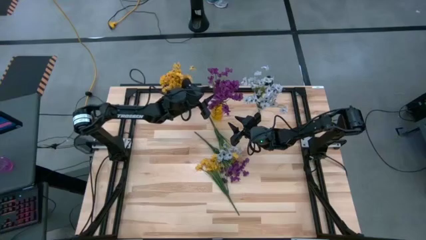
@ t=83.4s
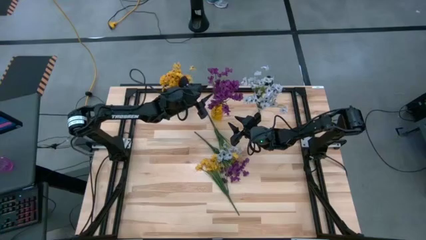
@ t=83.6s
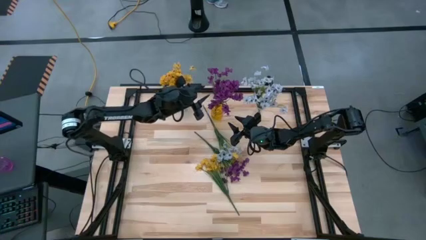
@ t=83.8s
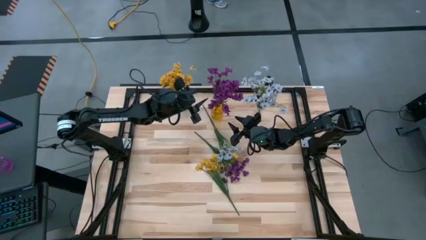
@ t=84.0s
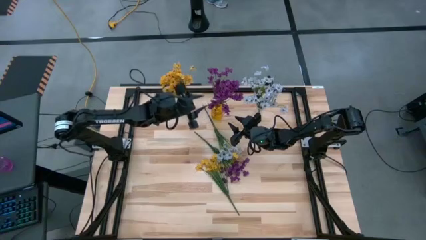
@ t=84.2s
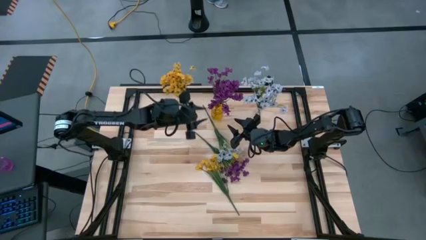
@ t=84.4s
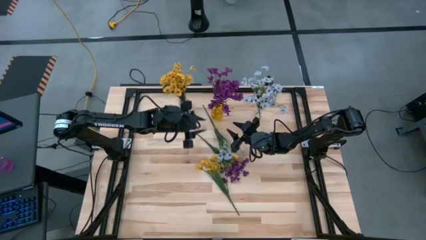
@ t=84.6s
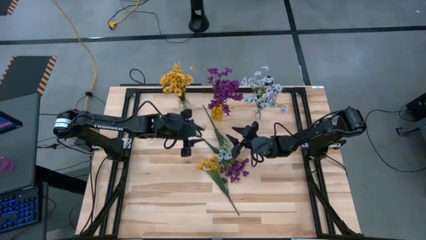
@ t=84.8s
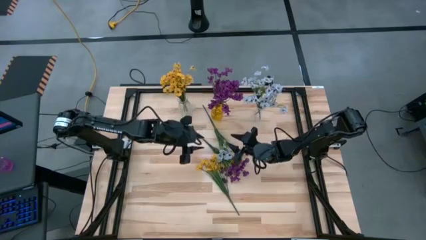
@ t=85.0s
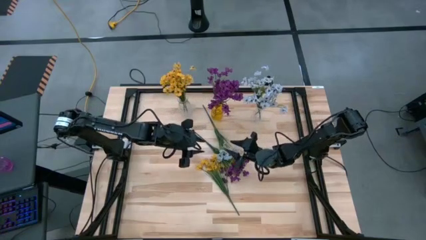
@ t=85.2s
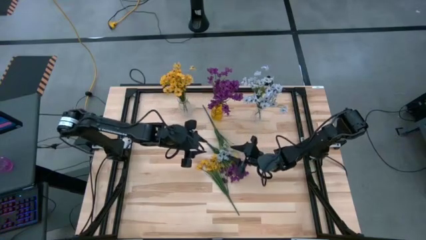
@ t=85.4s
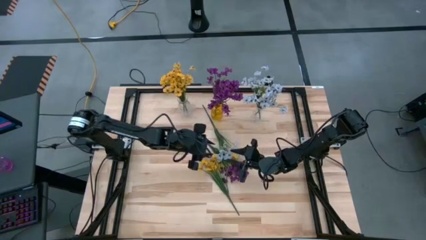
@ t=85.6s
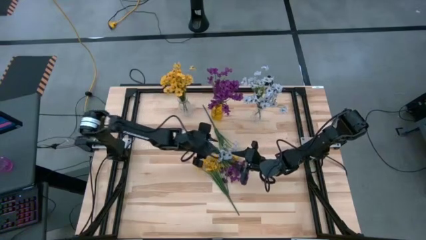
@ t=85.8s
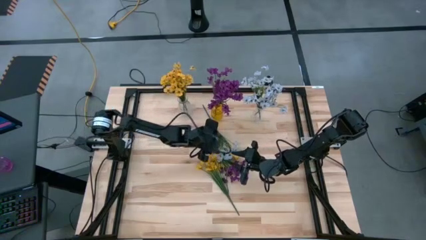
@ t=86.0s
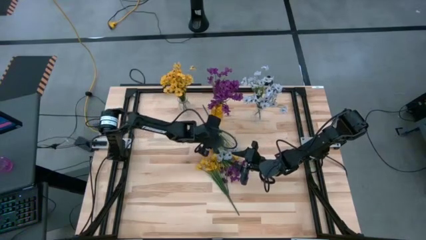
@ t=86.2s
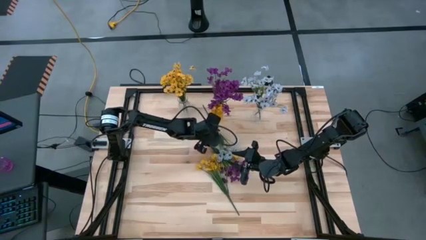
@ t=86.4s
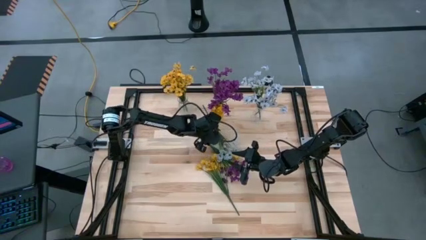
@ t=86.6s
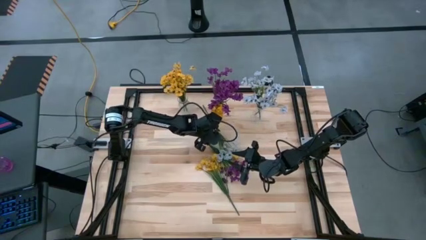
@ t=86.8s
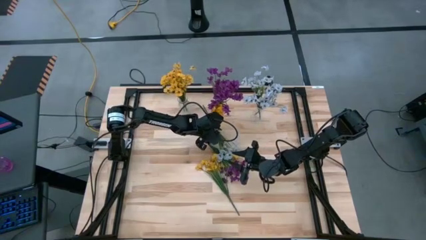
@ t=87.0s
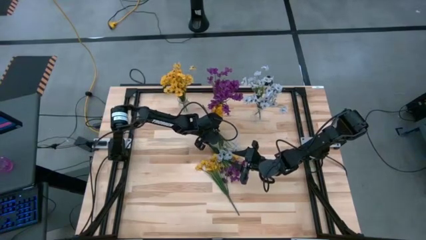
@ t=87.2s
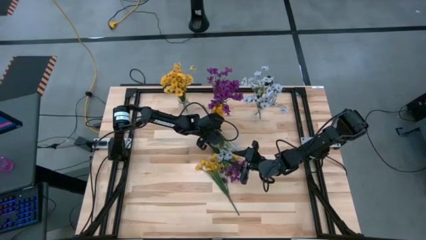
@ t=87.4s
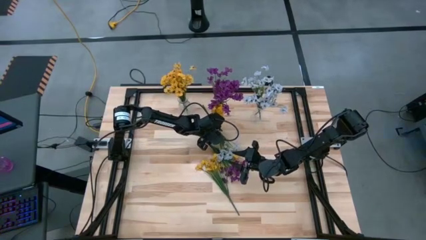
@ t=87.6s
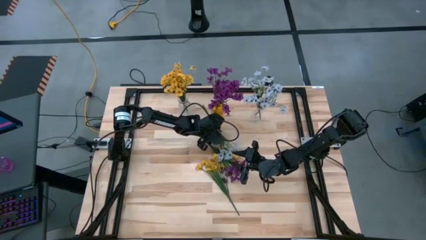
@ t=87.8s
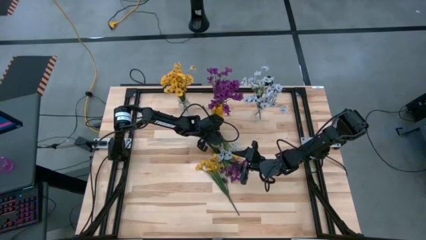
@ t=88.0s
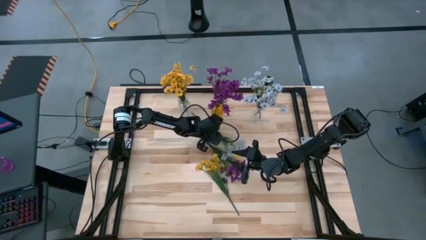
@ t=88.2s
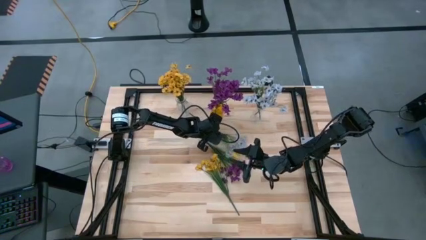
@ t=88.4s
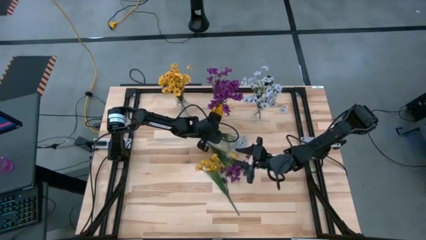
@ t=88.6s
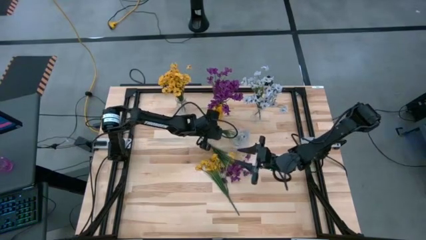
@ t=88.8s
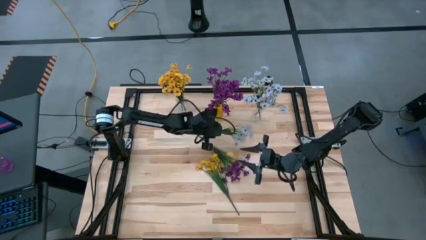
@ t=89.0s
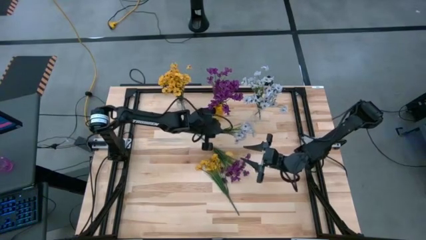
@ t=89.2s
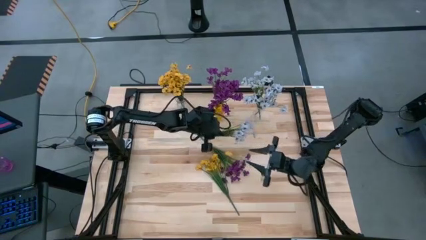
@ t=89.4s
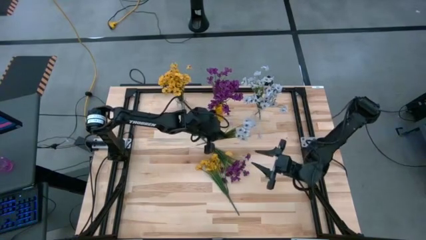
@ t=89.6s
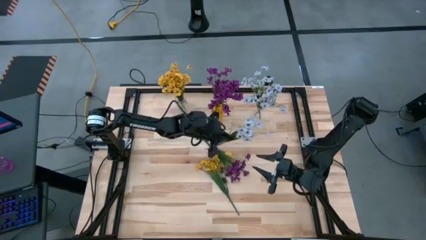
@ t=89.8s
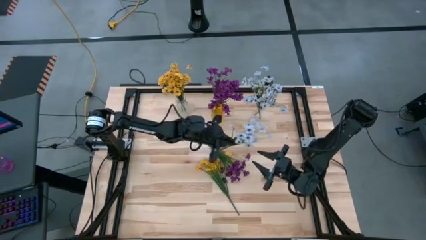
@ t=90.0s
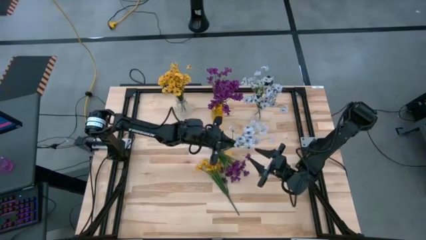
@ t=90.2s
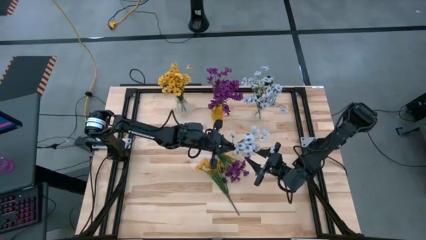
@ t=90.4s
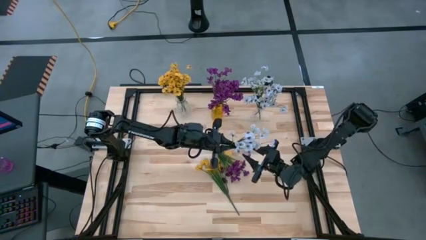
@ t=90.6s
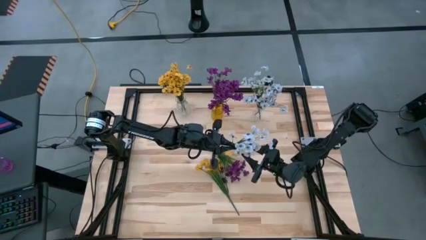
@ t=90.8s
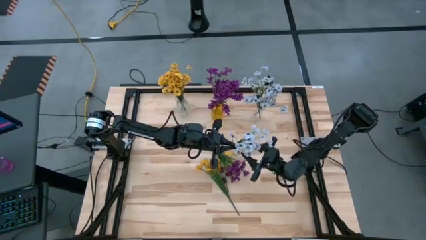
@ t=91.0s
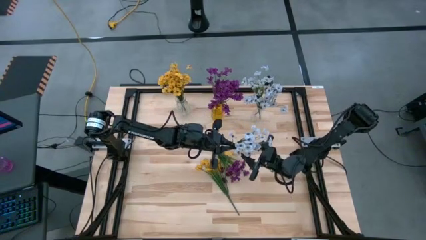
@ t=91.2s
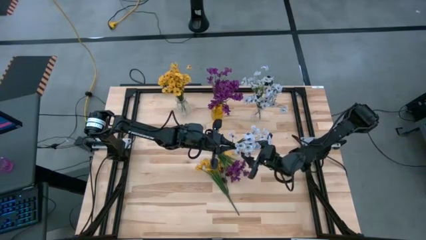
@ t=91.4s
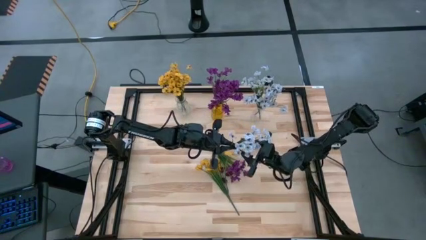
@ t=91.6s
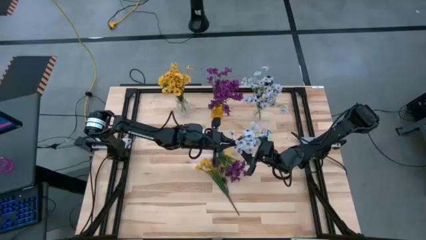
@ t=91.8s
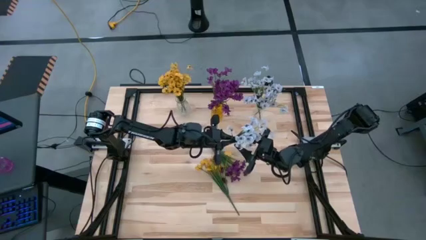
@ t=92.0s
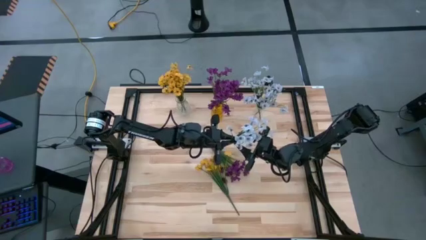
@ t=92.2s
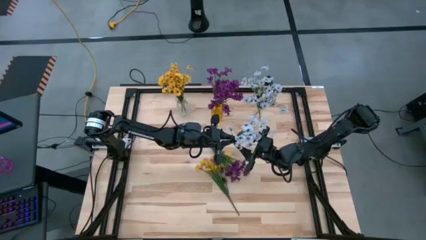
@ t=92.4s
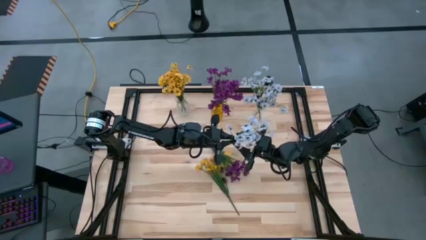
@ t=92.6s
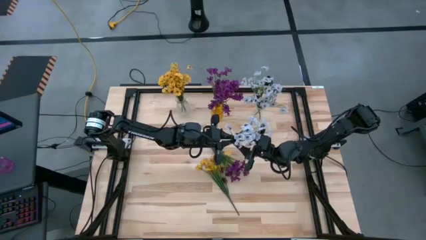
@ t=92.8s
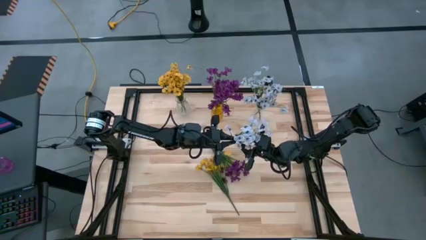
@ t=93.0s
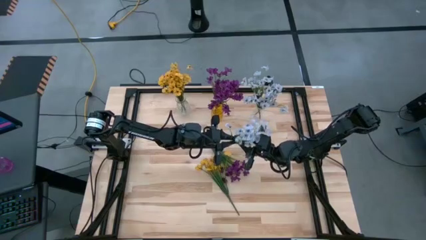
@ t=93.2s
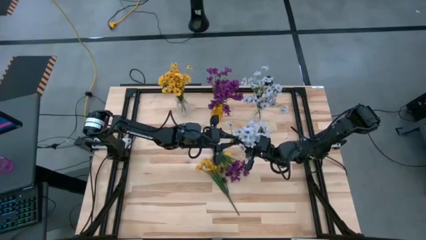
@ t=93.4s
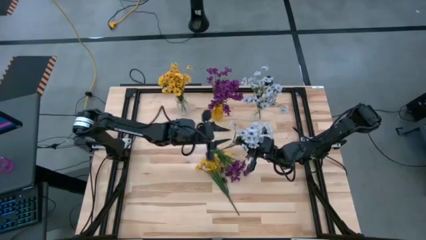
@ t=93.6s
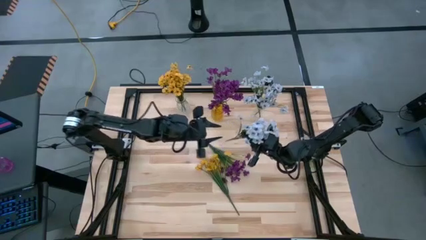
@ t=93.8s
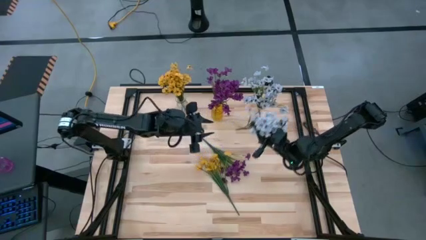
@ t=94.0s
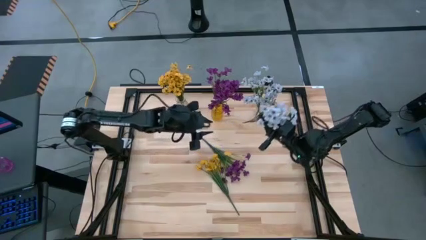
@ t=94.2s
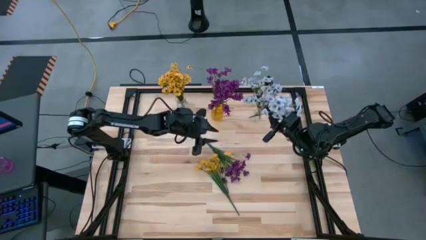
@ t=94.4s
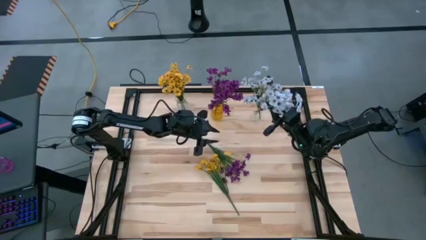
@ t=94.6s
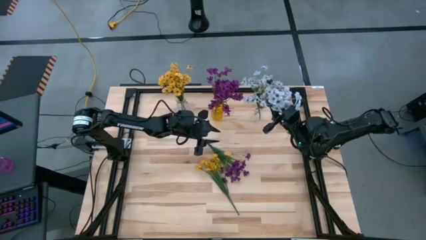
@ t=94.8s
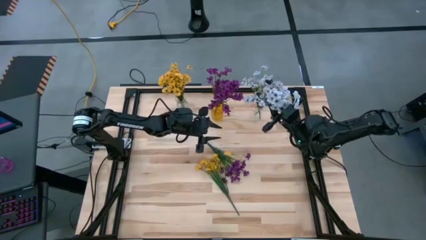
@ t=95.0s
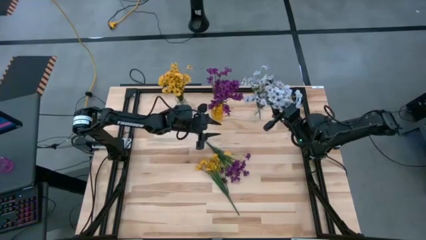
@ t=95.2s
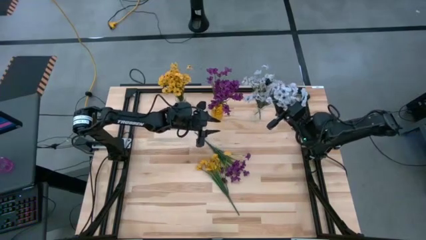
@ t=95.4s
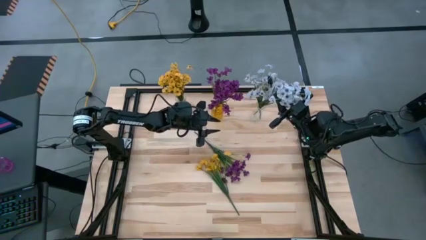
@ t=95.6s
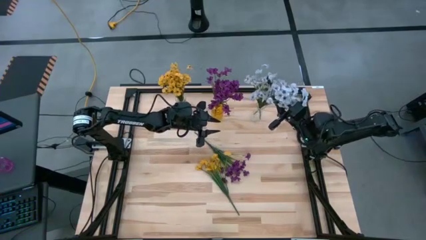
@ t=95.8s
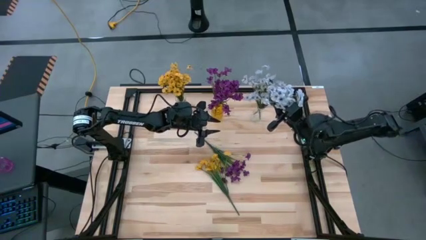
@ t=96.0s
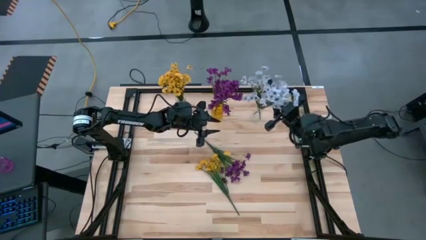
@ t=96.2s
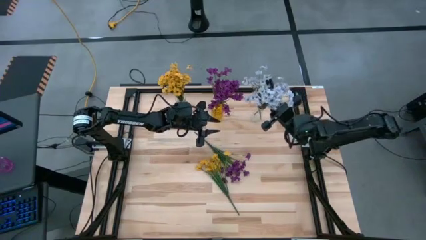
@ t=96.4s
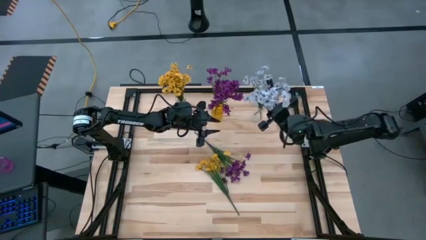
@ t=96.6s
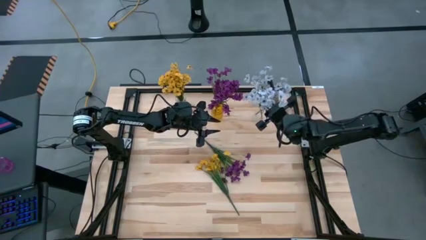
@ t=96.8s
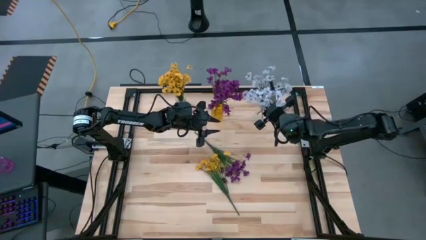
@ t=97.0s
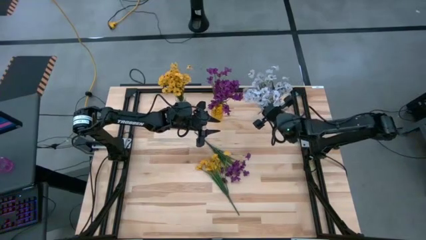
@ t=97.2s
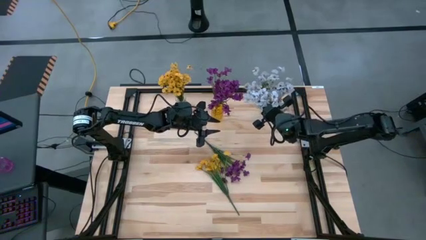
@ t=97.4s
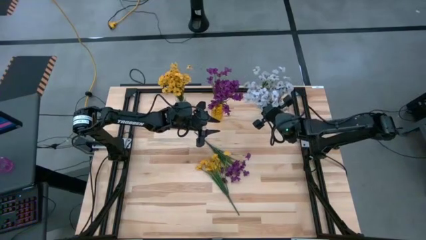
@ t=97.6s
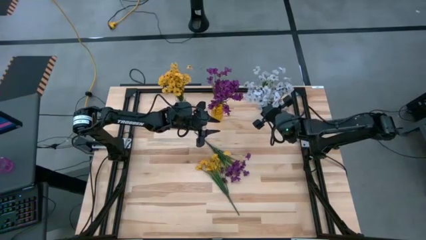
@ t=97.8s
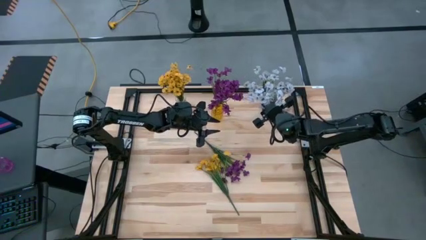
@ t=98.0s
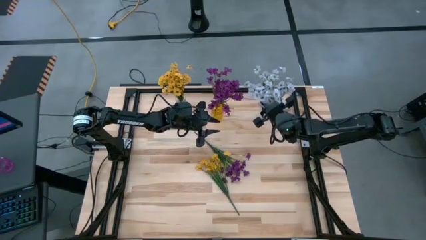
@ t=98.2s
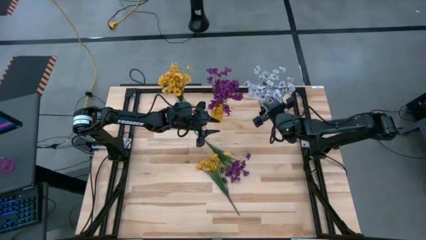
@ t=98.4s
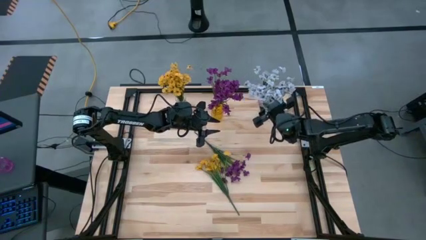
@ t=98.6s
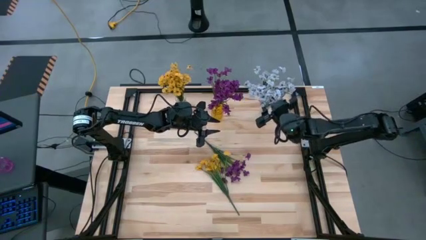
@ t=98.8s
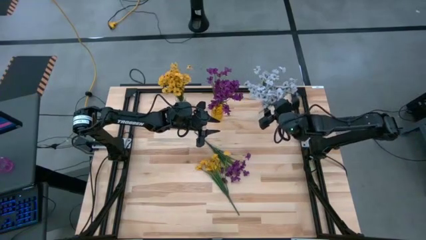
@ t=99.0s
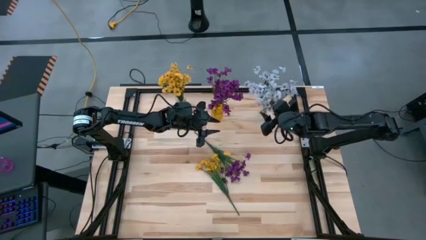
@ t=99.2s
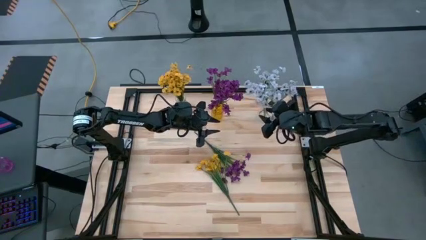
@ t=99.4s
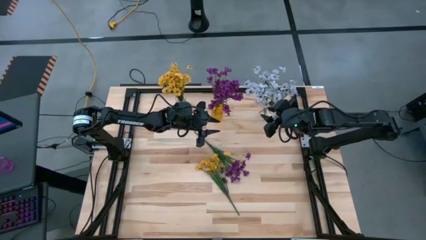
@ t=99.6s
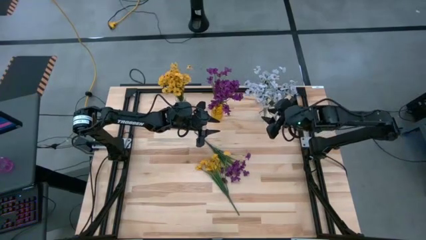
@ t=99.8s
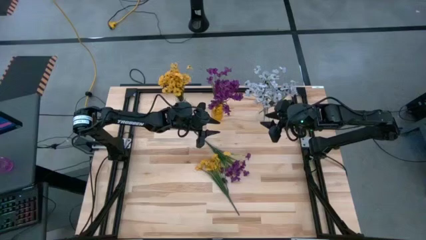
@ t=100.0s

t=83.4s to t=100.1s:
Task: Sort flowers into vase by color
Put the white flowers into the right transparent vase
